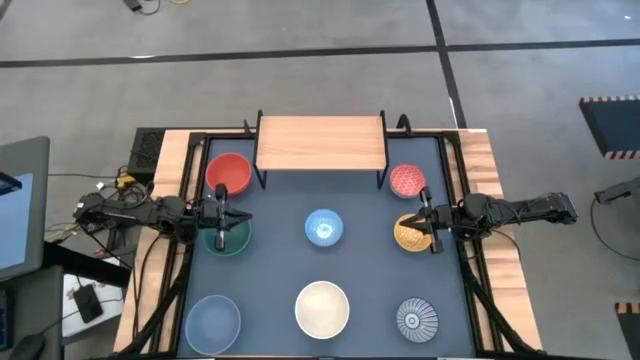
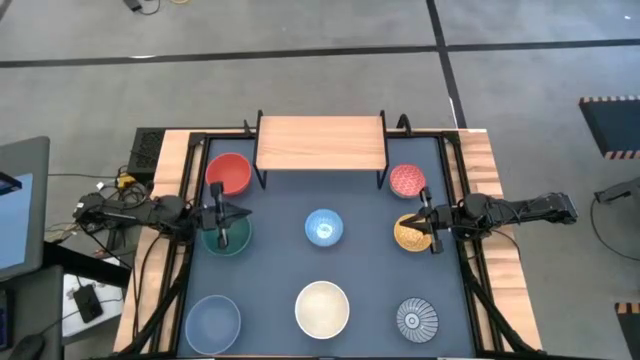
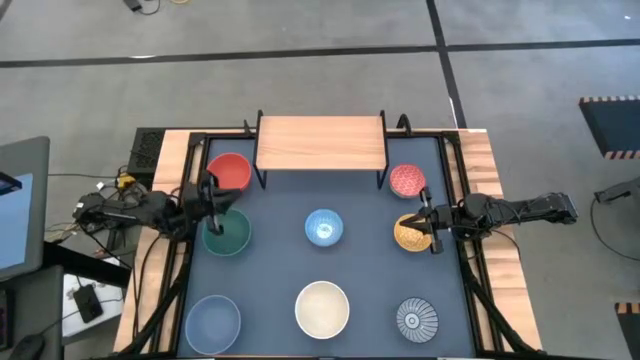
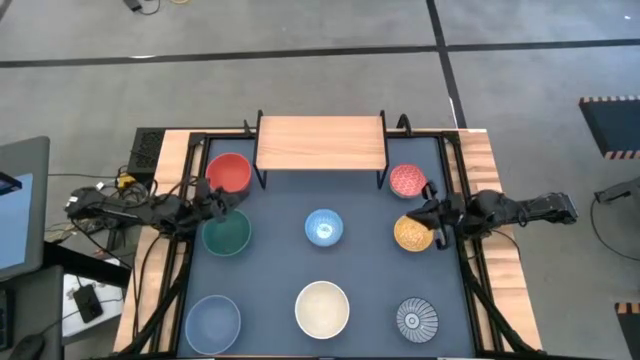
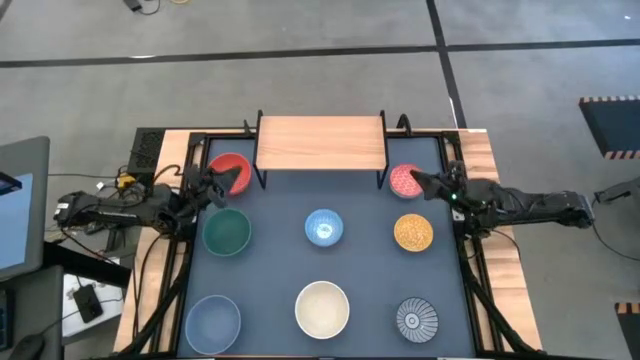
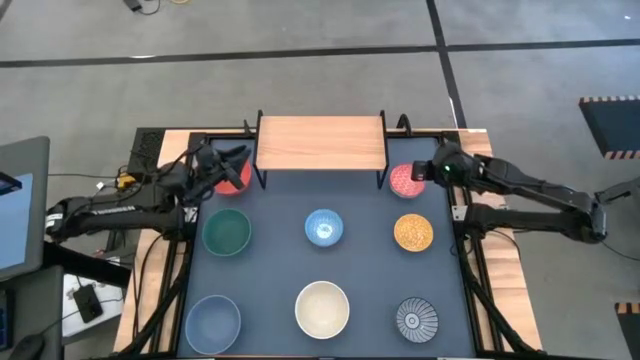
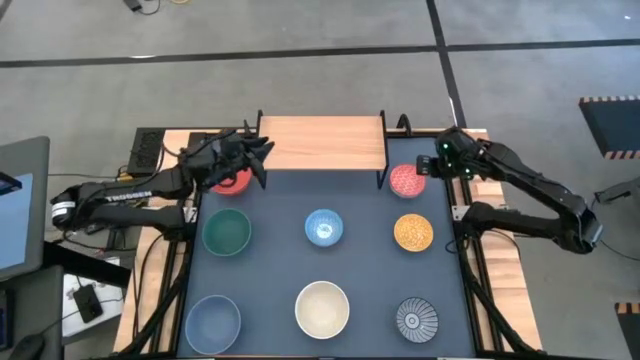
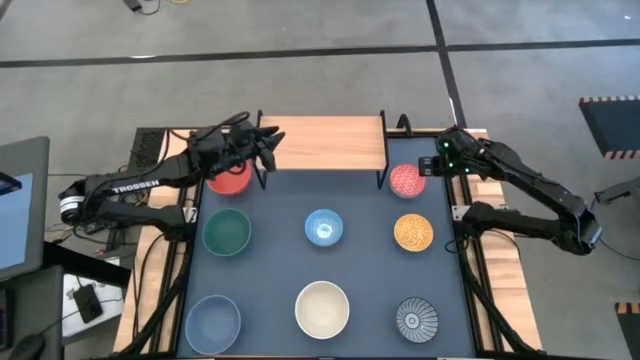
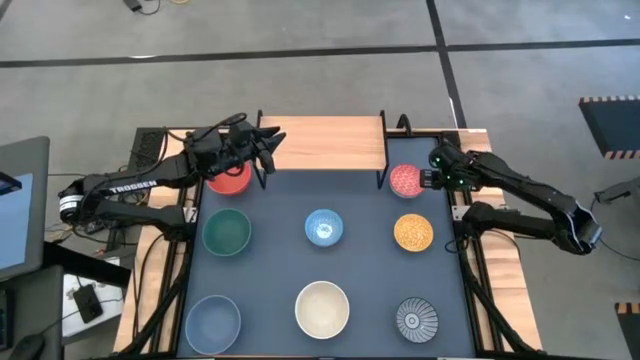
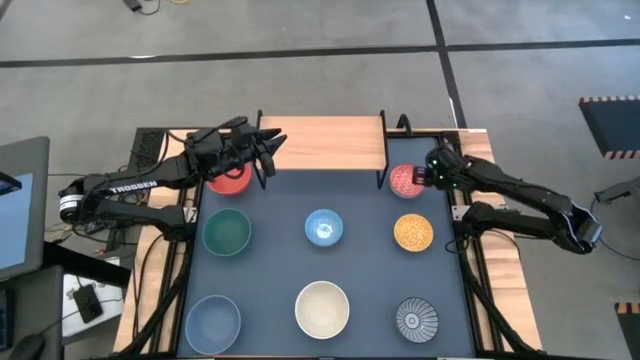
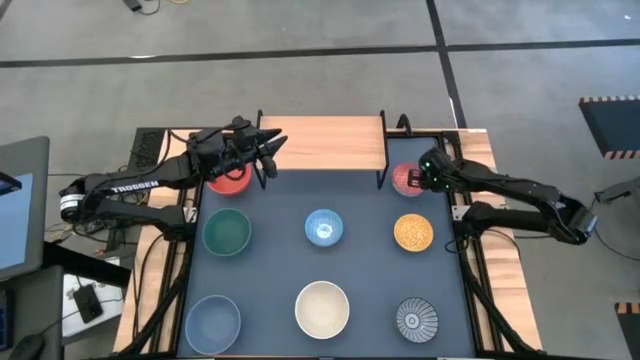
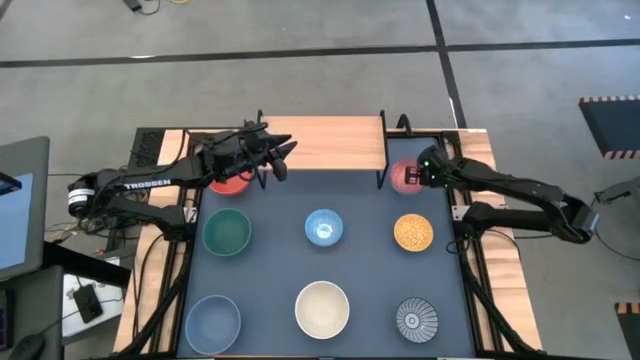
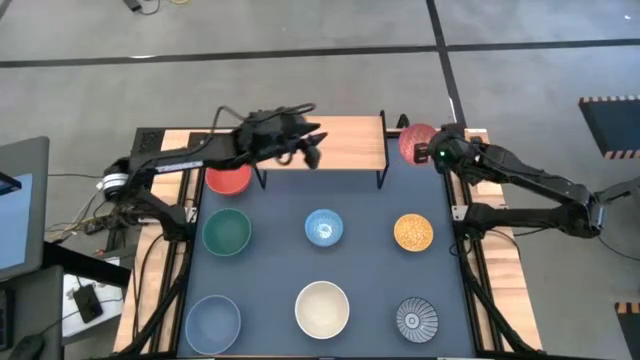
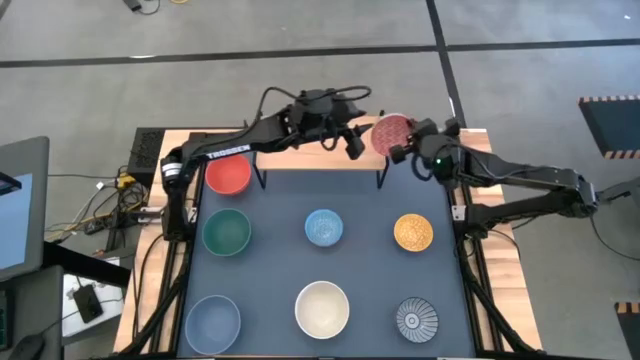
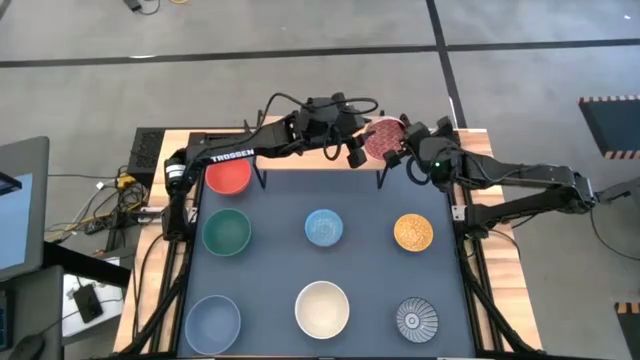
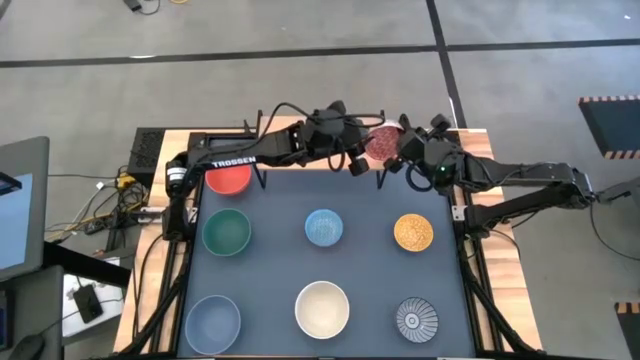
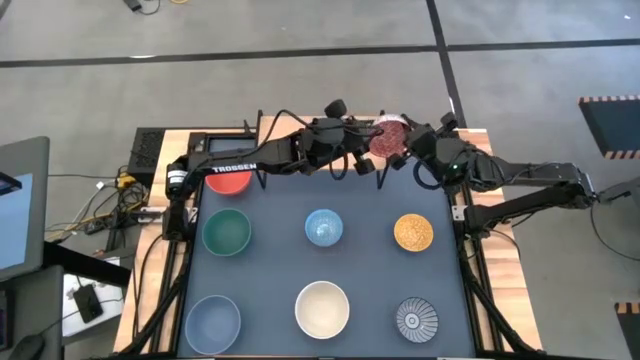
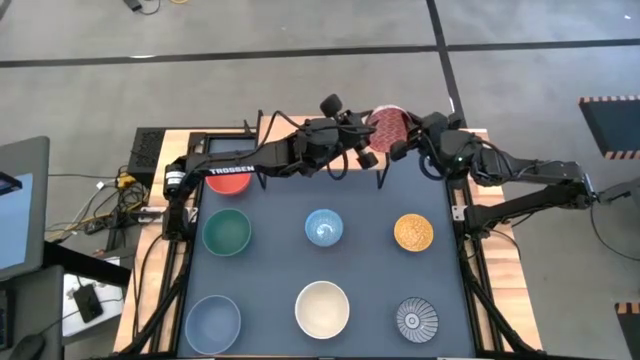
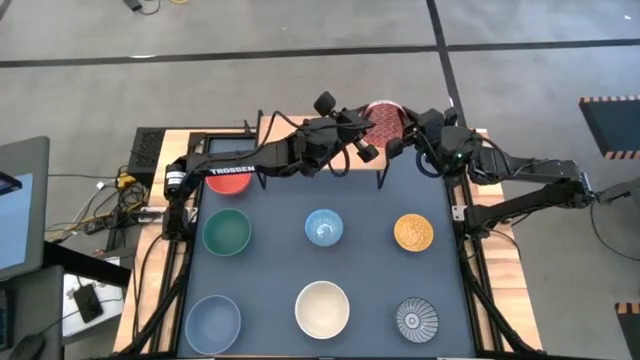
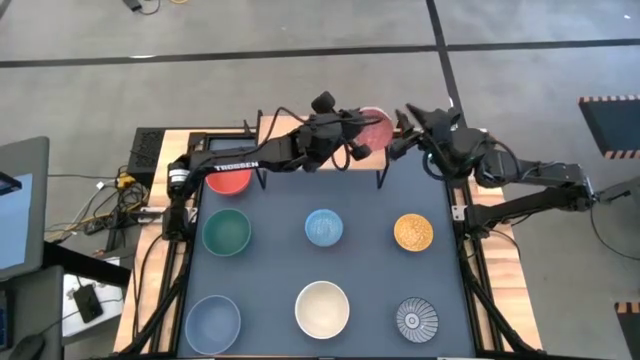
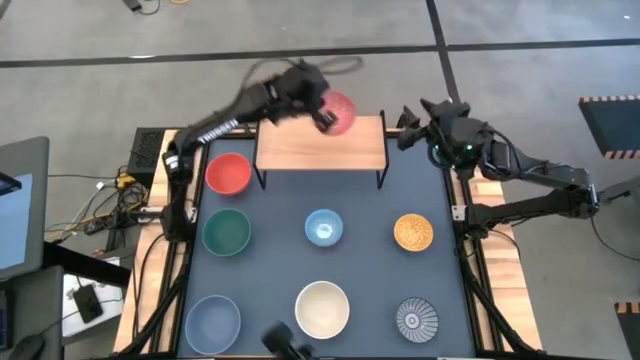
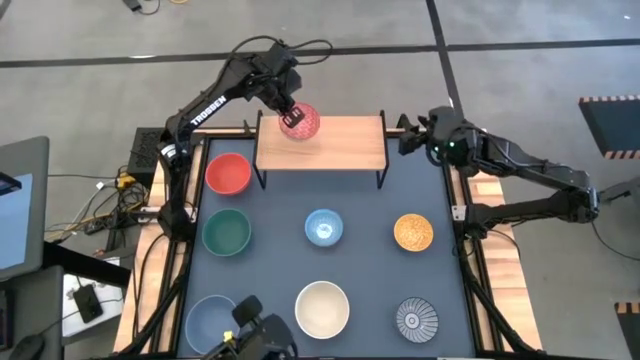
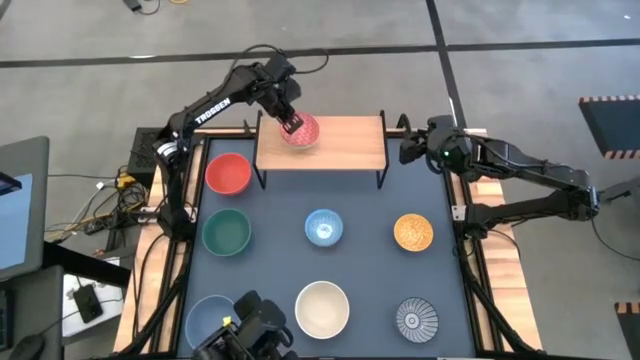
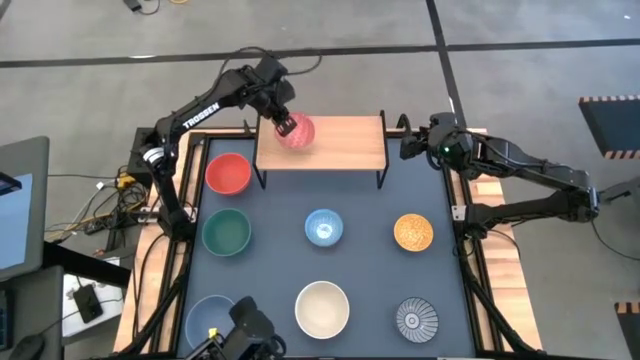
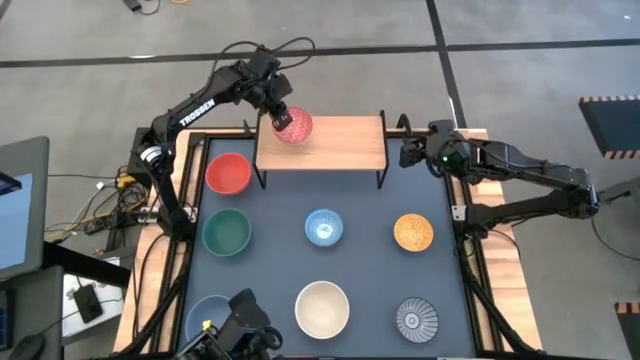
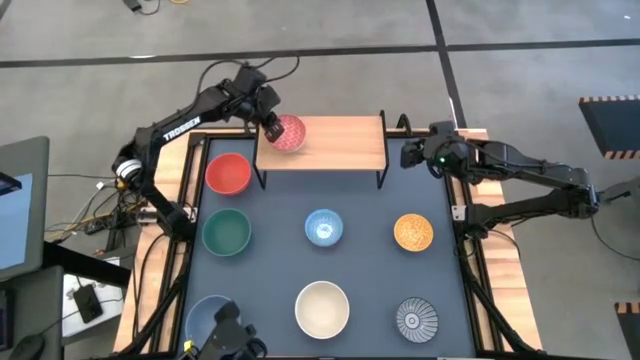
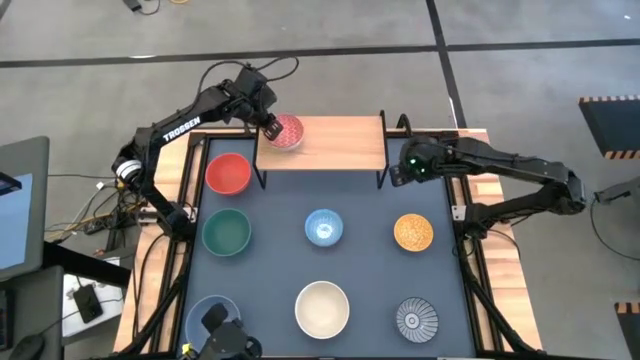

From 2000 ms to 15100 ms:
Task: Place and stack bowls onto a shelf
Put the red patterned bowl on the shelf

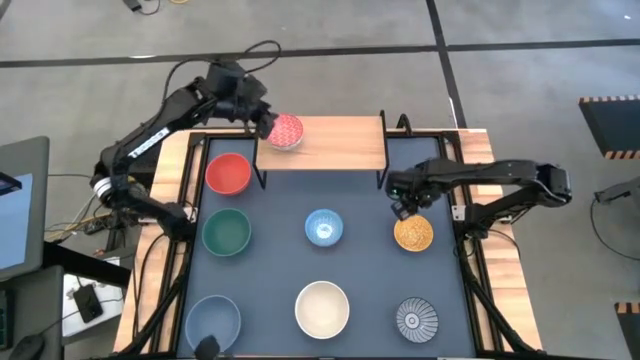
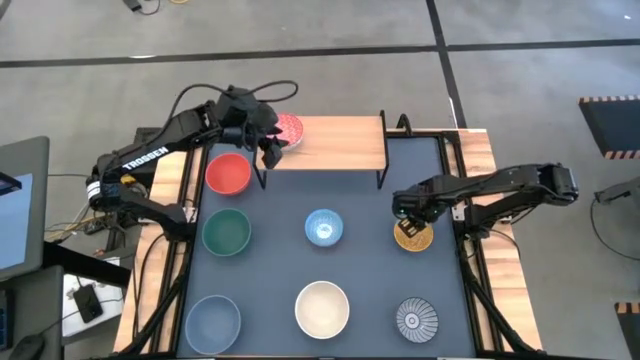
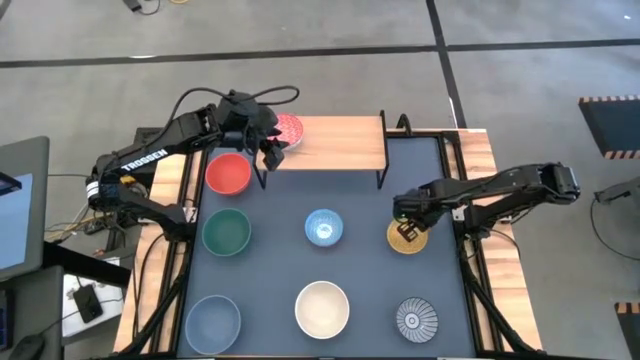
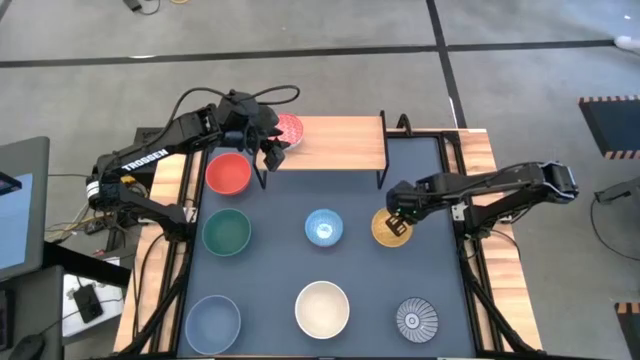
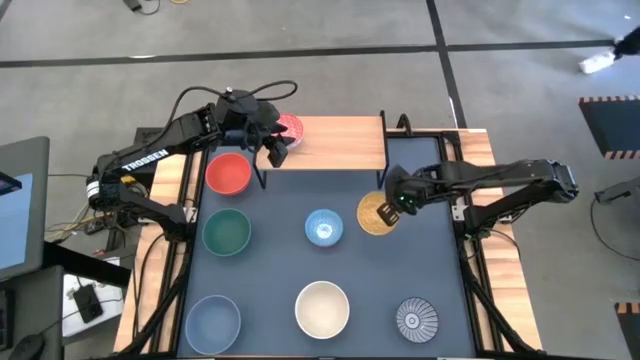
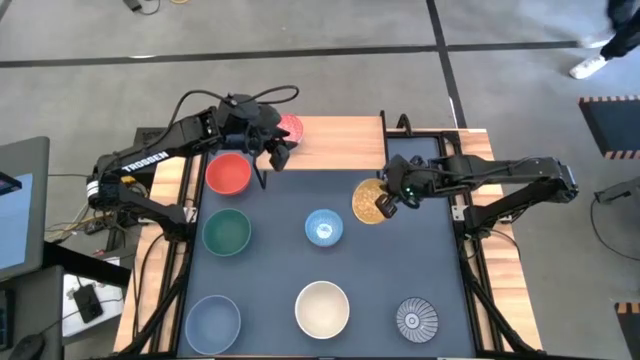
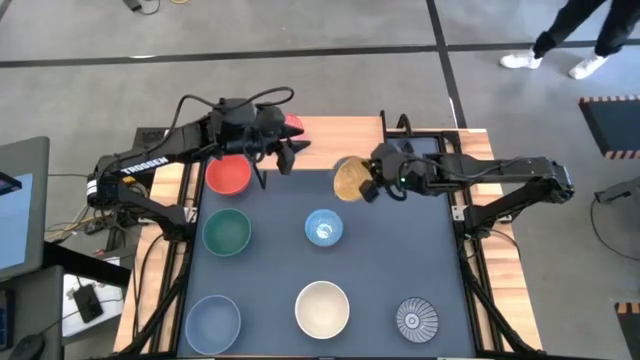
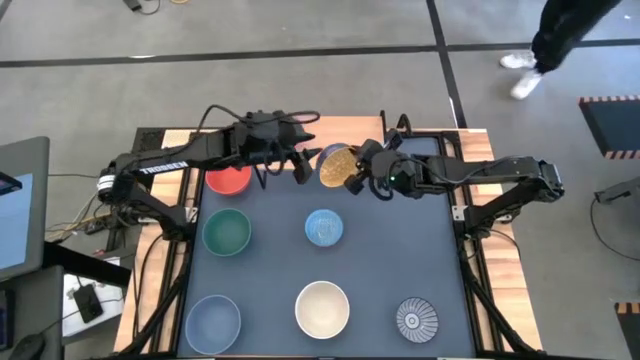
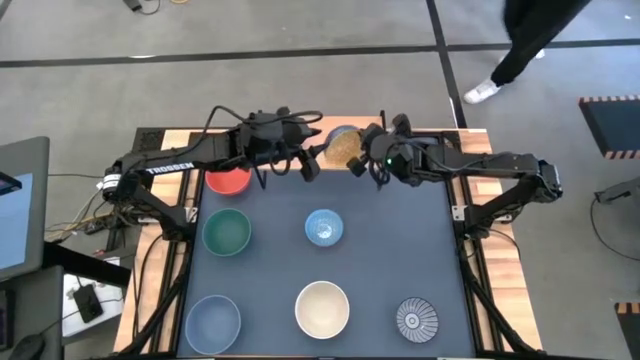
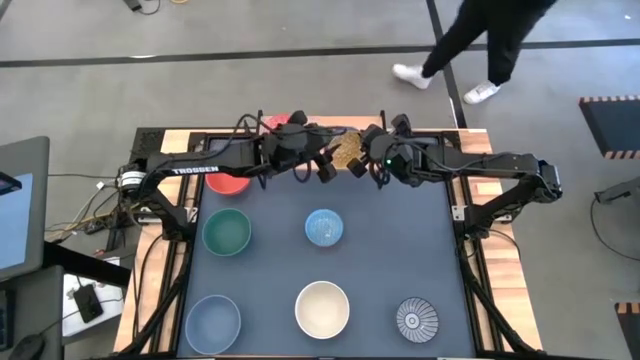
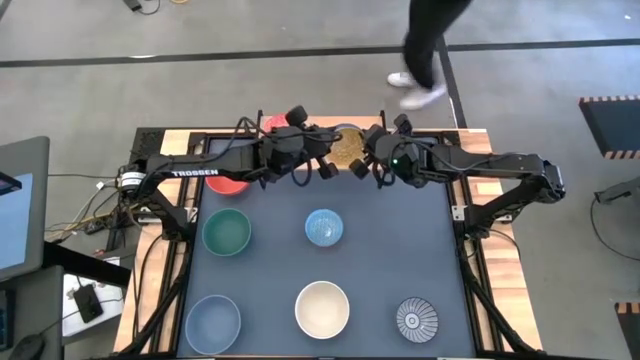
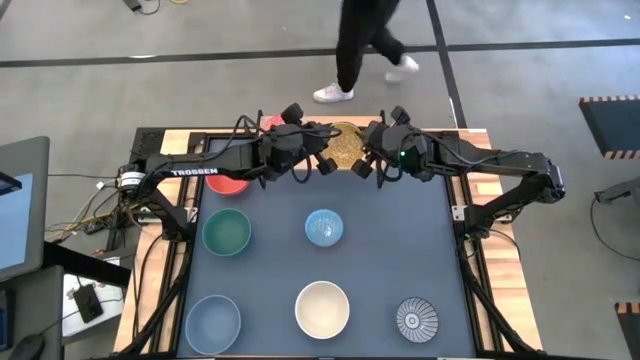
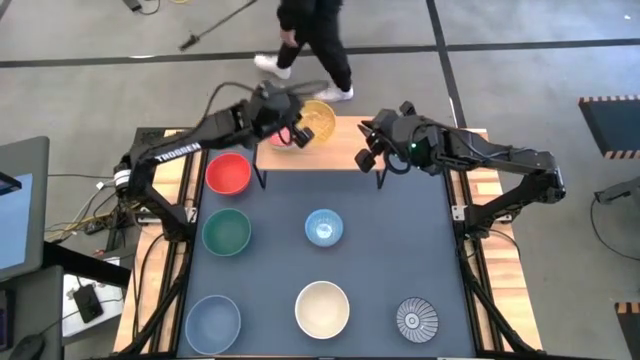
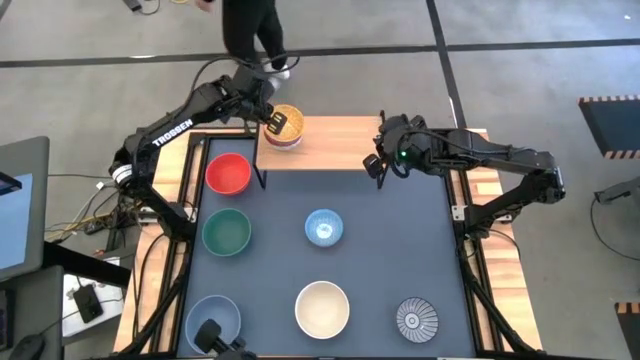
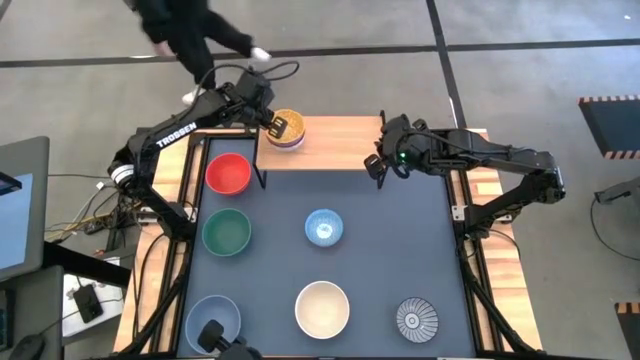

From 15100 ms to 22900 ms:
Stack the yellow patterned bowl on the top of the red patterned bowl on the shelf

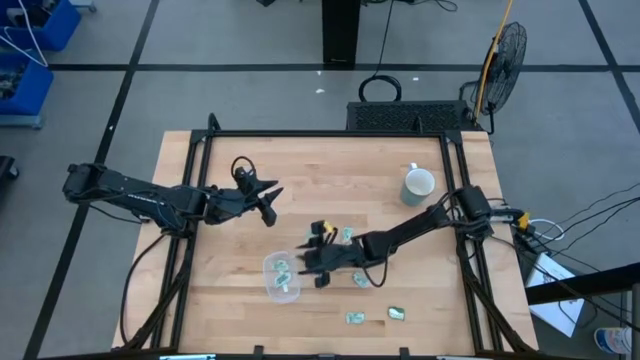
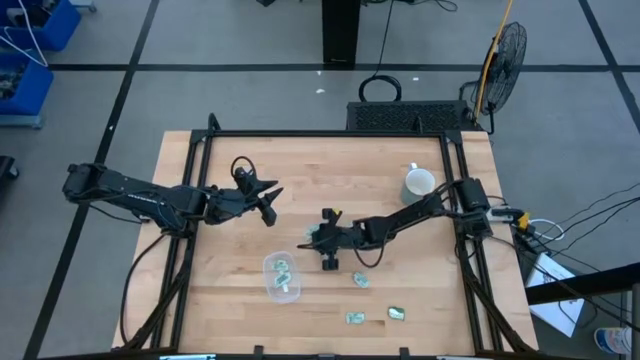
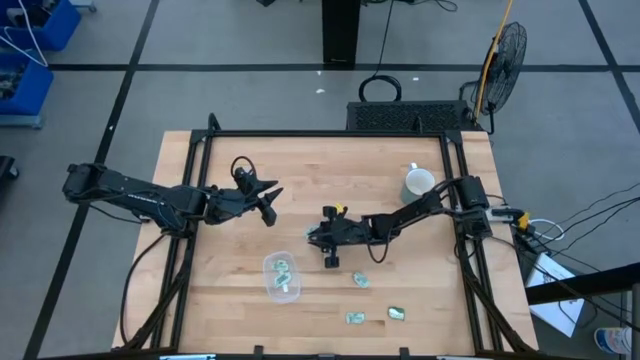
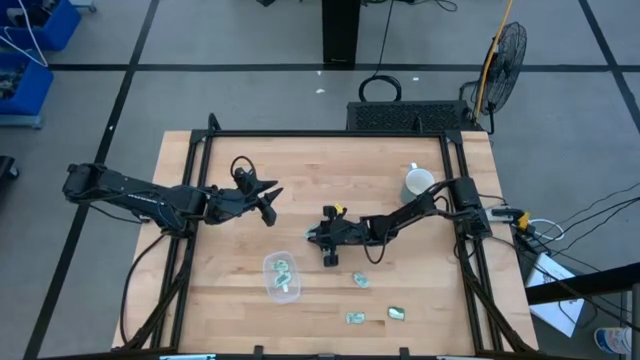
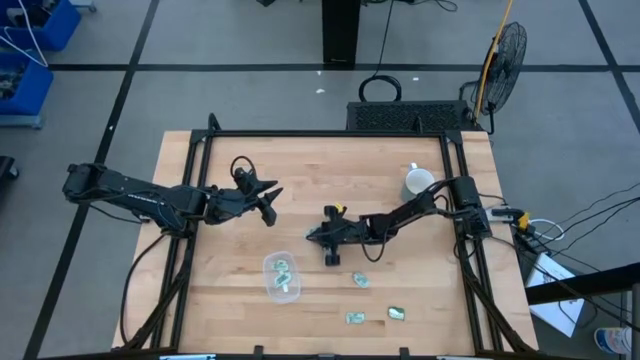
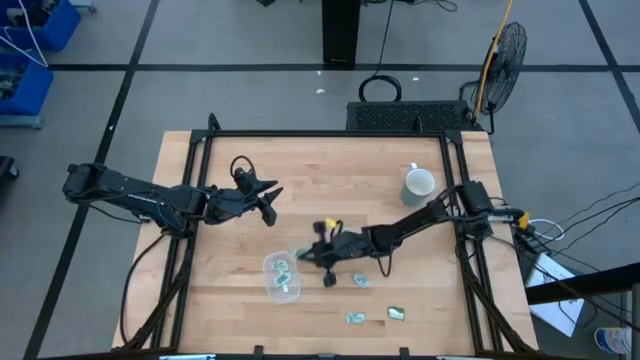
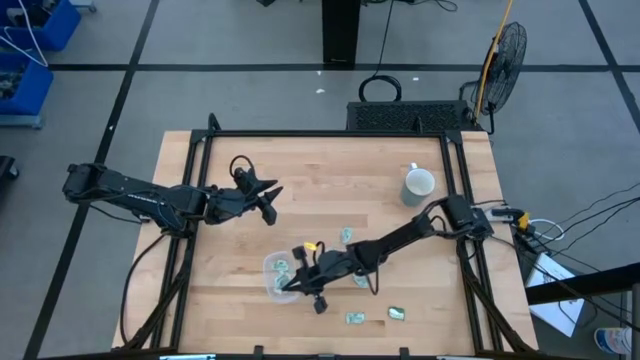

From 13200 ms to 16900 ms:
Task: Pick and place Stevia / Truvia into bins
Put the stevia packet into the transparent container
